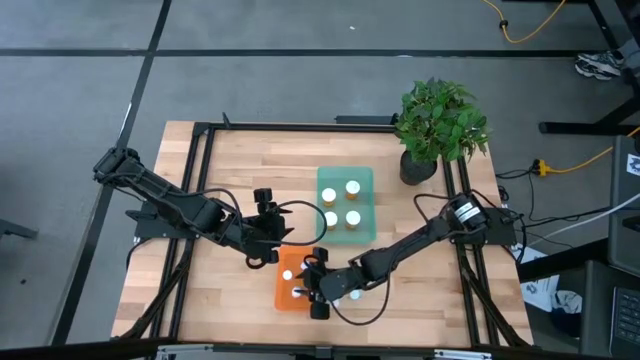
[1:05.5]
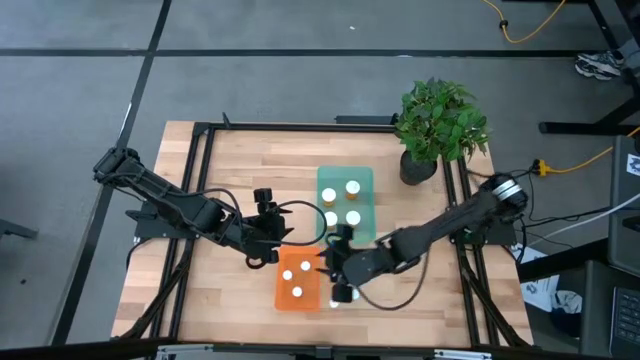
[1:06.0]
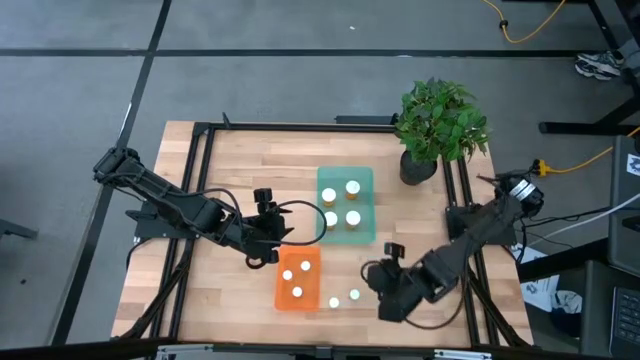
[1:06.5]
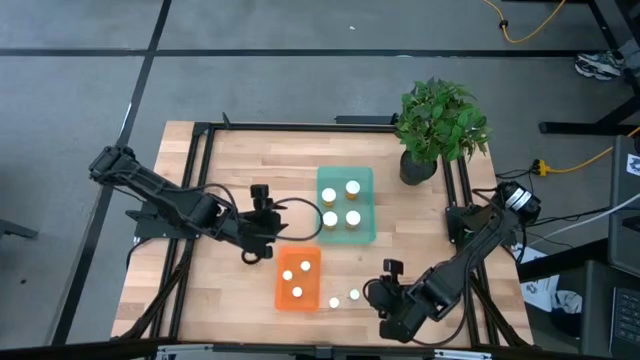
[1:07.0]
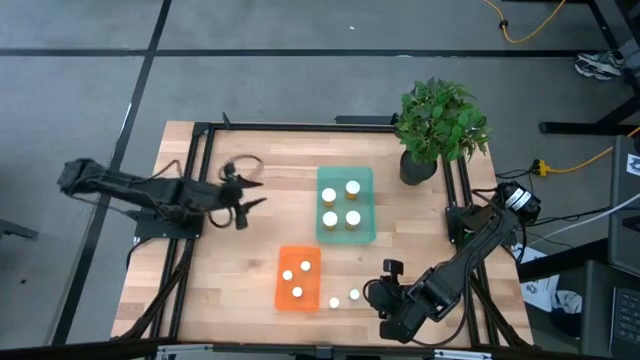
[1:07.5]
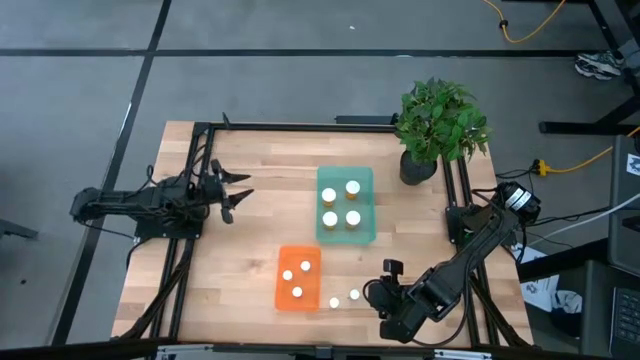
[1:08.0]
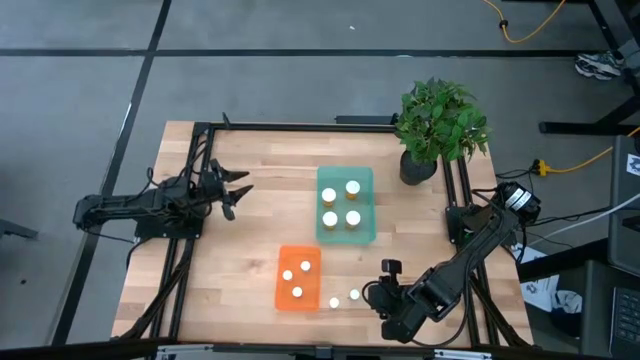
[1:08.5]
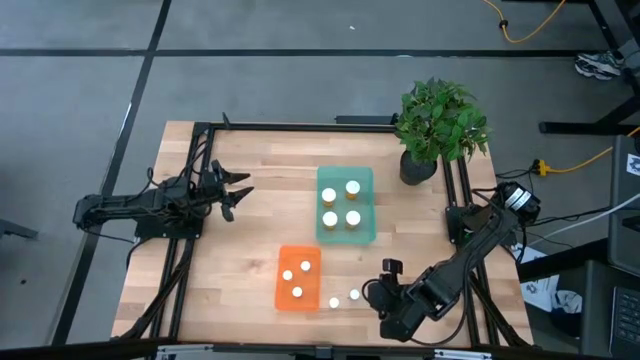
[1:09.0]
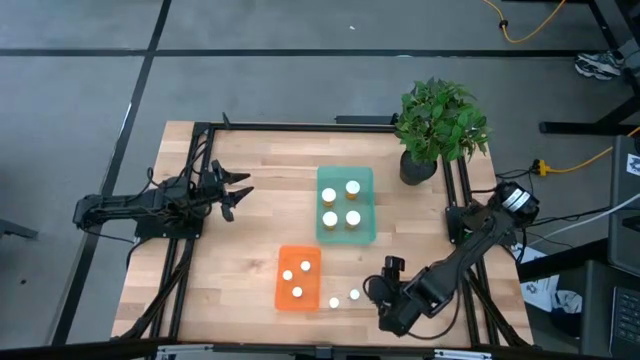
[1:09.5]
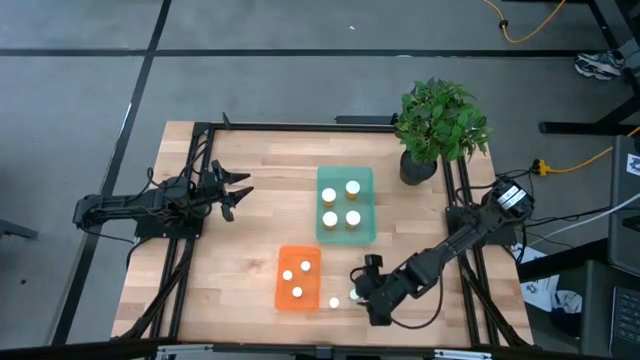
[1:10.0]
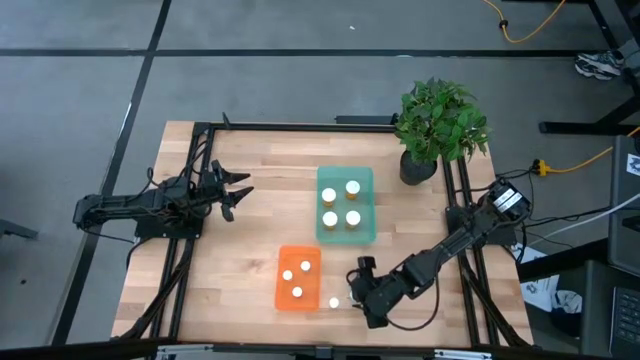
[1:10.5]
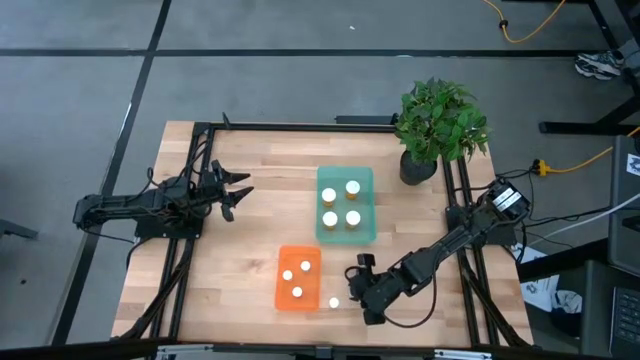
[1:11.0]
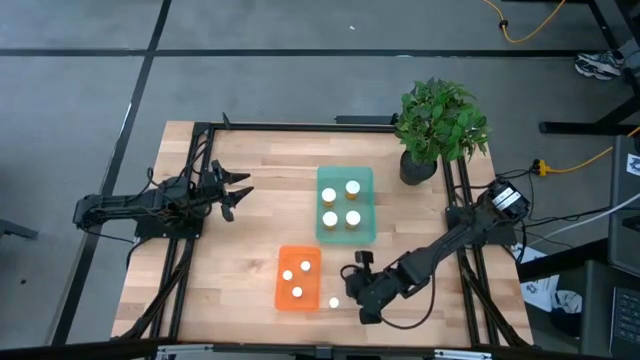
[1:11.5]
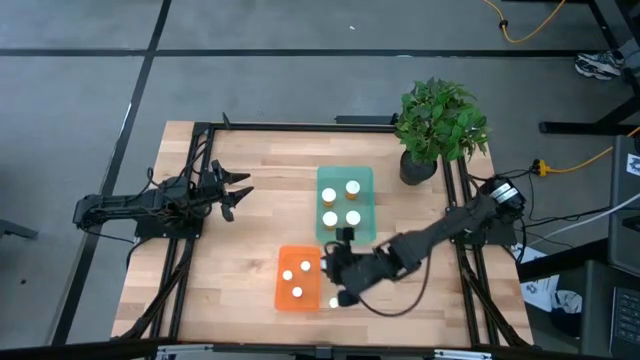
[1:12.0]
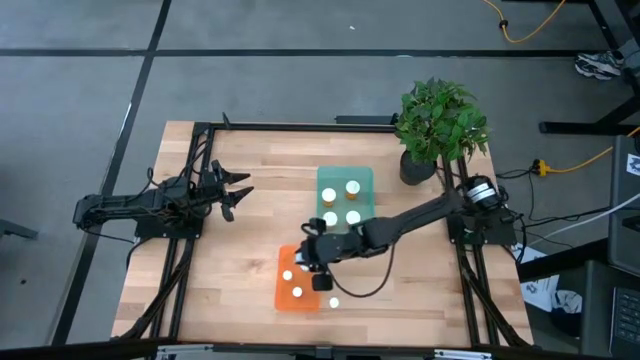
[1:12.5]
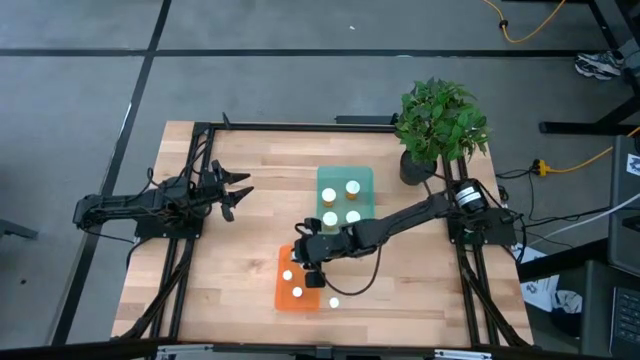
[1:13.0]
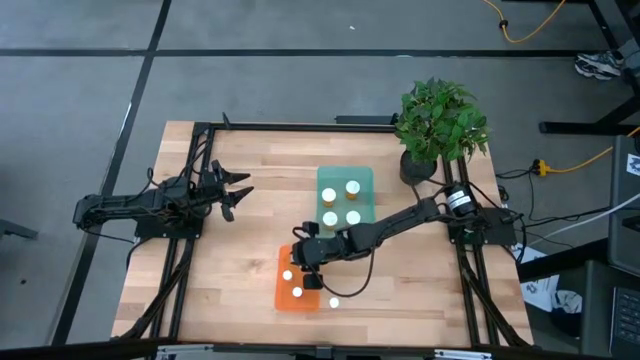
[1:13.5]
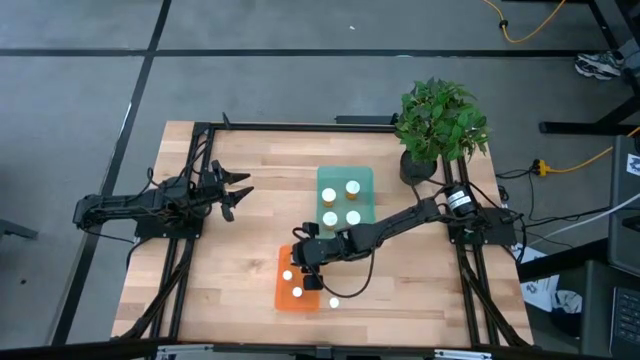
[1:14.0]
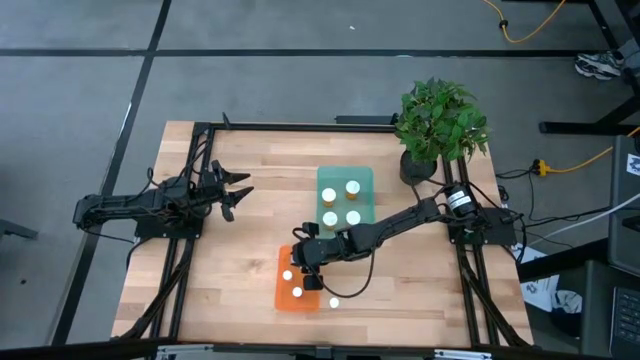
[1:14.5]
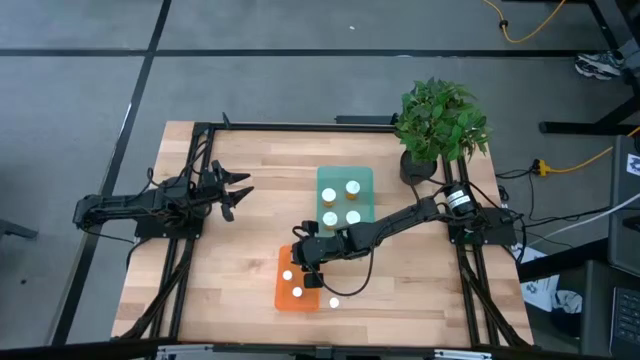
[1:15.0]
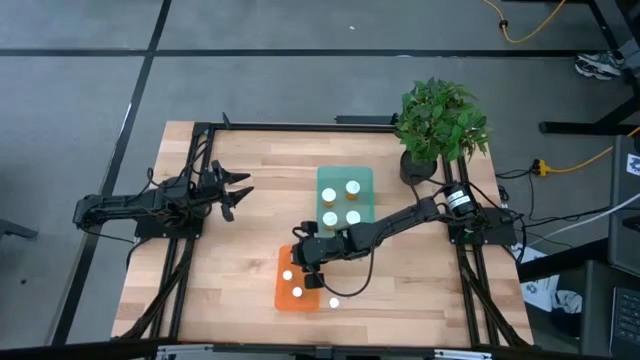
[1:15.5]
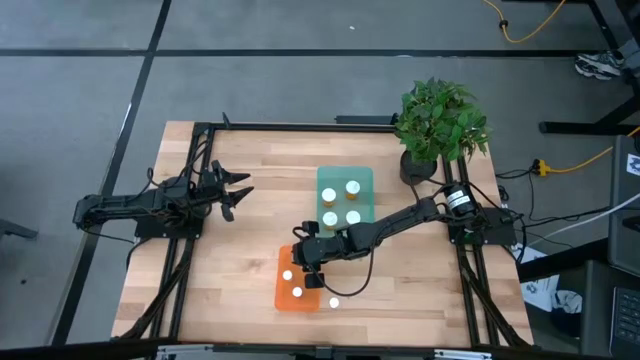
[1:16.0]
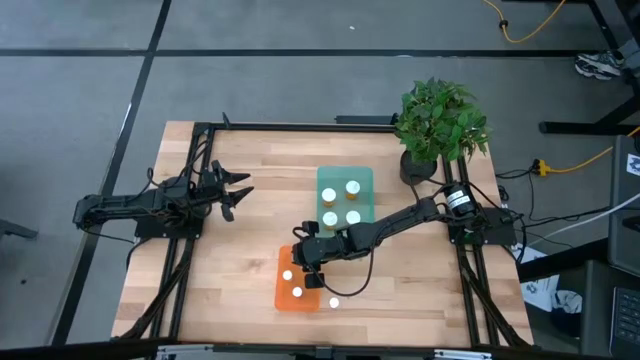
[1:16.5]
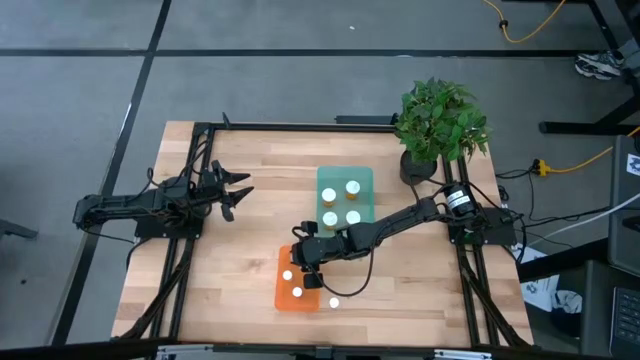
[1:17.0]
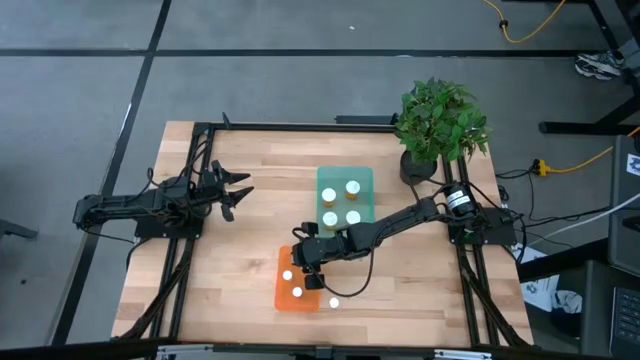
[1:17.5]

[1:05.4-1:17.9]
Task: Pick and place medicine bottles into bin by pill shape (circle, oval)
Put the small blue pill bottle into the orange bin

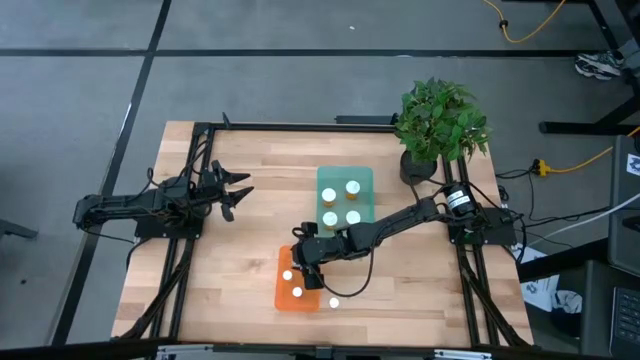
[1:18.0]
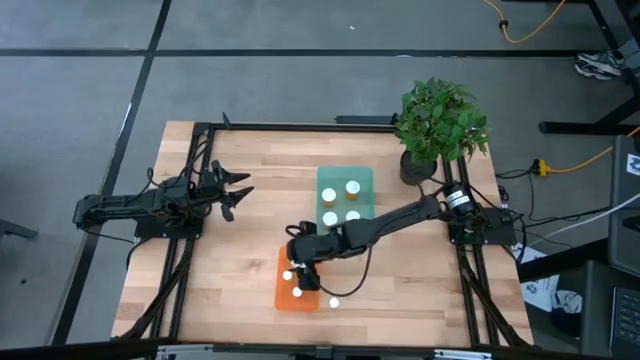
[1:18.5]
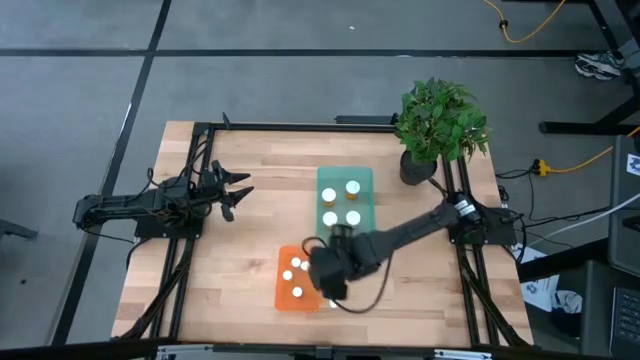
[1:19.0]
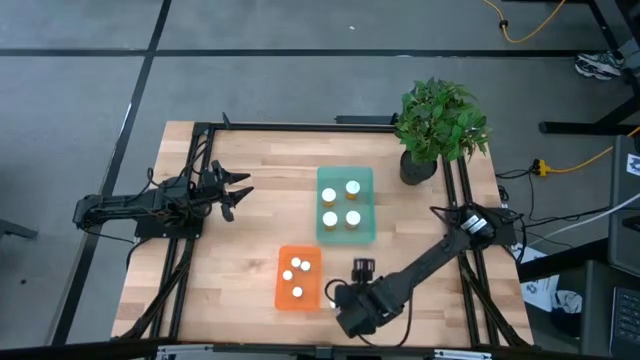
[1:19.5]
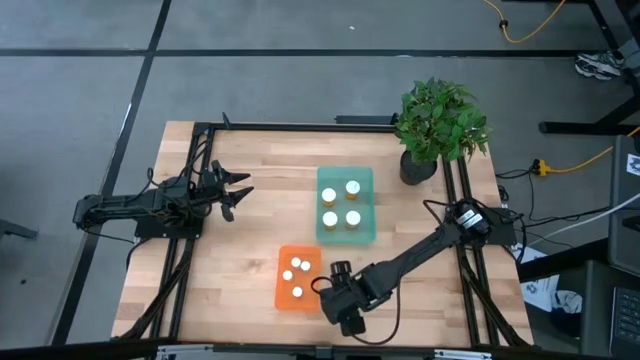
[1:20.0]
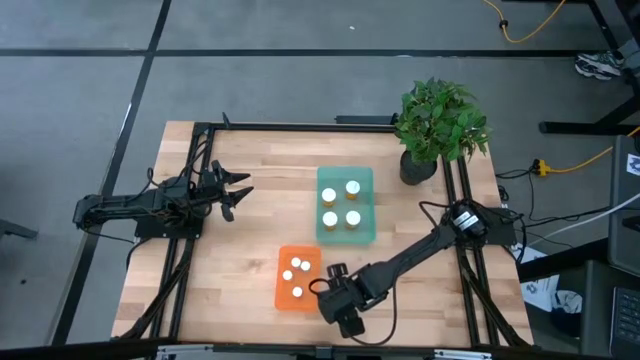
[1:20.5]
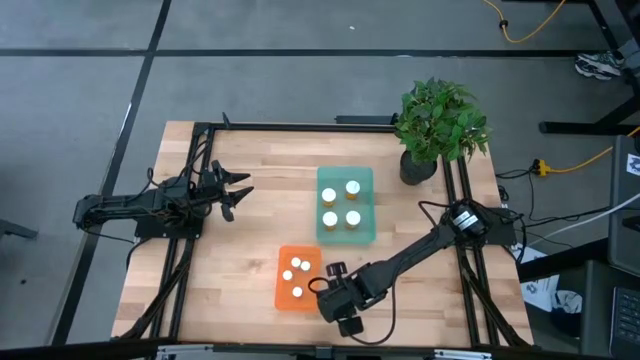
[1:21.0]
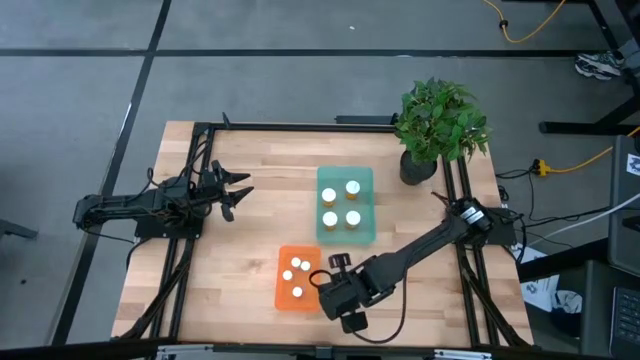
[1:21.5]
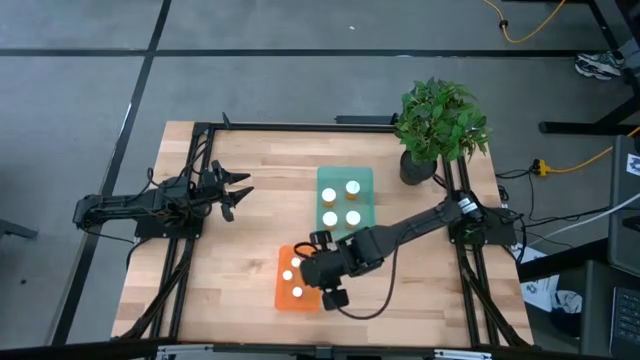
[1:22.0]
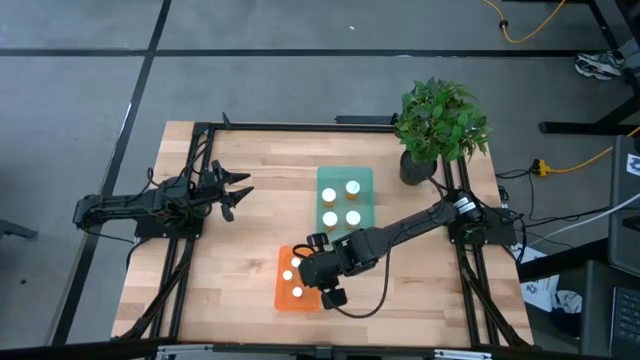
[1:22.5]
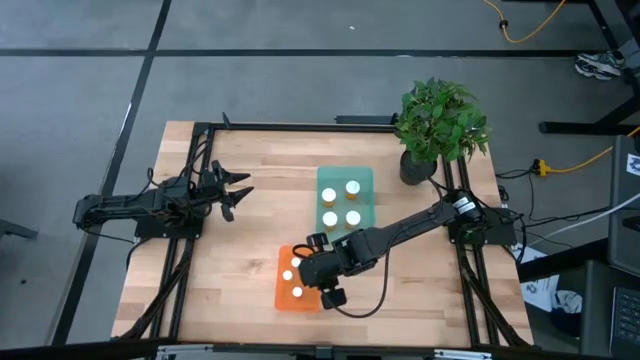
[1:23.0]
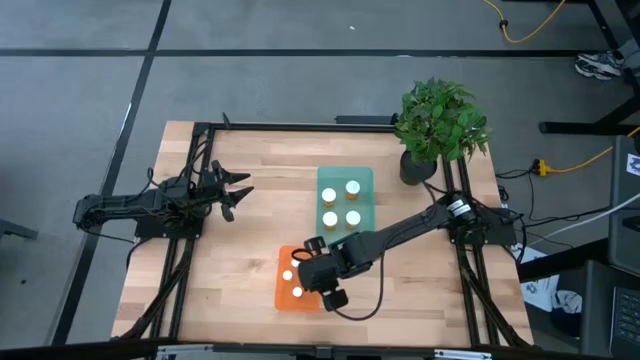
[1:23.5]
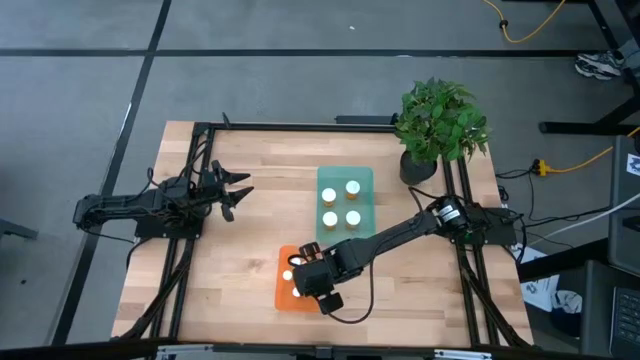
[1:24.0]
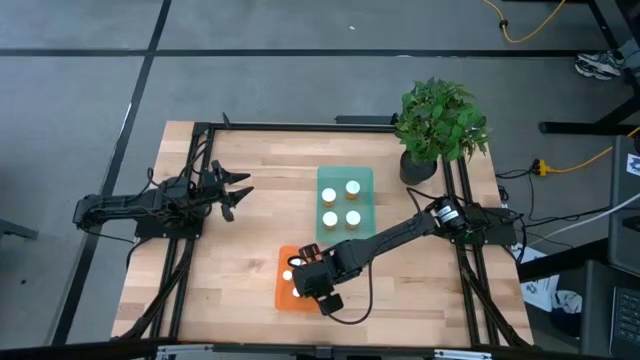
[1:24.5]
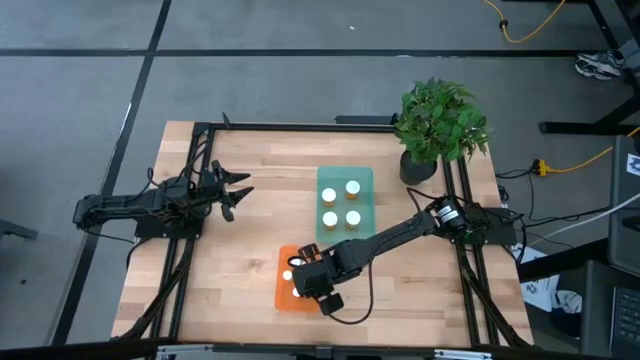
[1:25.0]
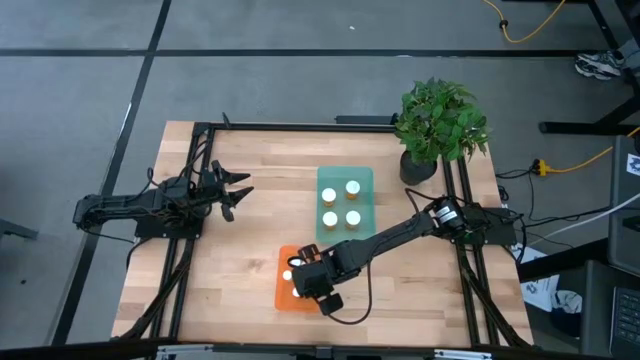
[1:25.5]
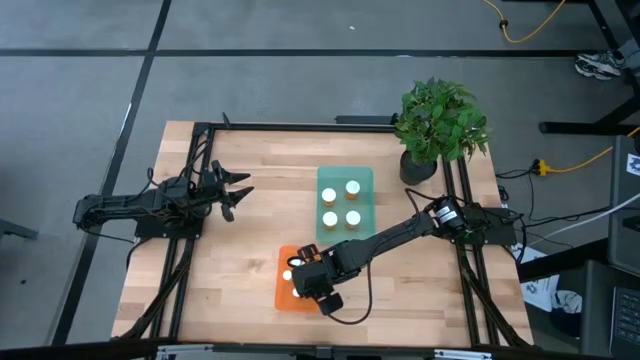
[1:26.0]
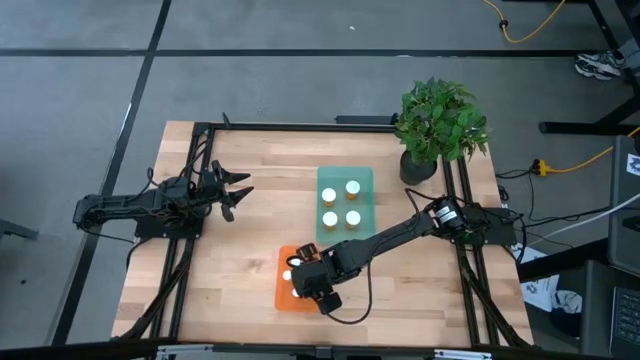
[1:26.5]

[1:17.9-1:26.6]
Put the small yellow pill bottle into the orange bin
